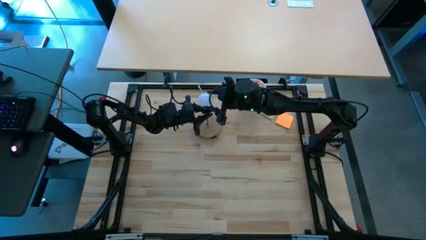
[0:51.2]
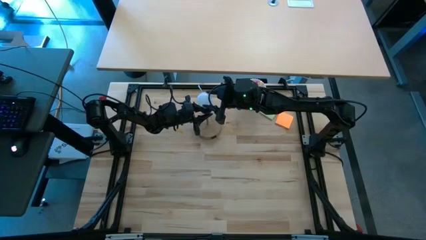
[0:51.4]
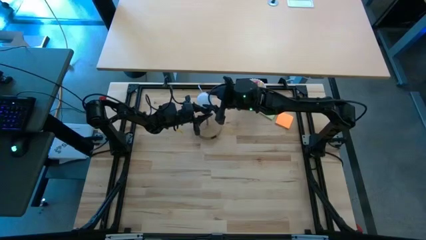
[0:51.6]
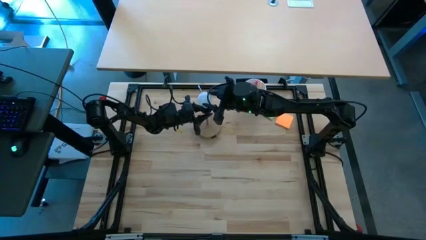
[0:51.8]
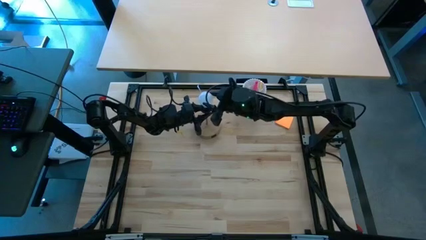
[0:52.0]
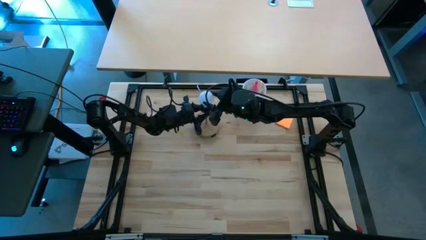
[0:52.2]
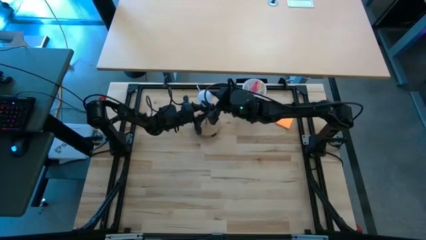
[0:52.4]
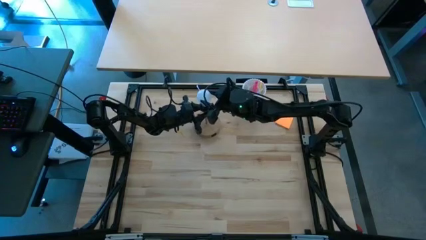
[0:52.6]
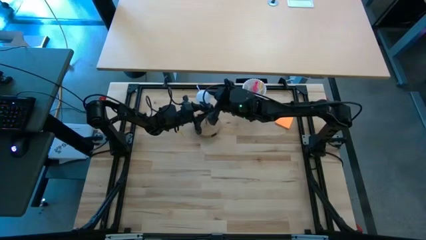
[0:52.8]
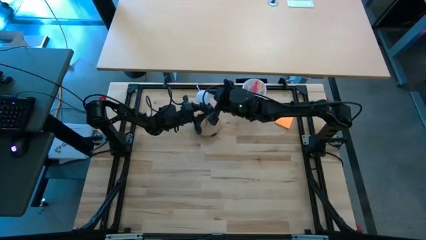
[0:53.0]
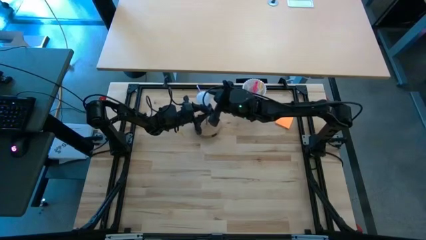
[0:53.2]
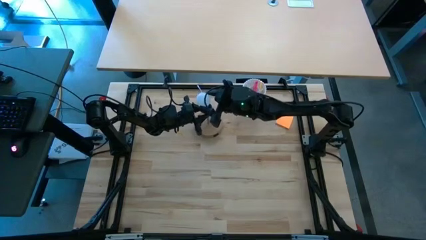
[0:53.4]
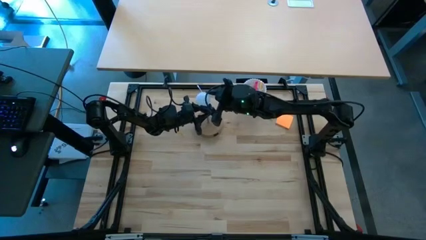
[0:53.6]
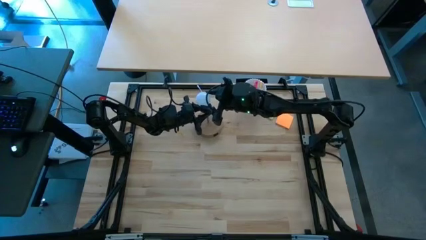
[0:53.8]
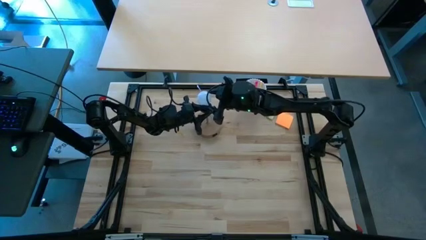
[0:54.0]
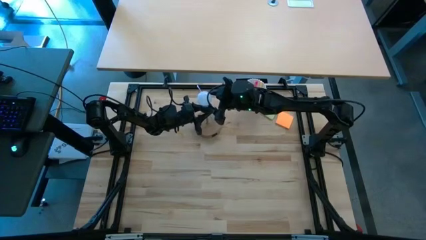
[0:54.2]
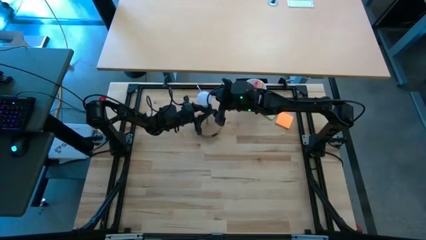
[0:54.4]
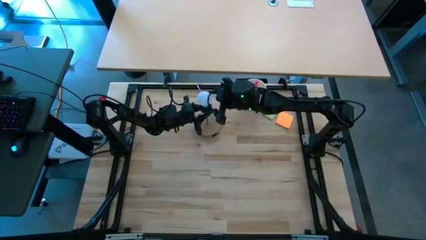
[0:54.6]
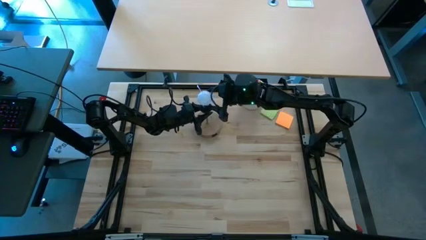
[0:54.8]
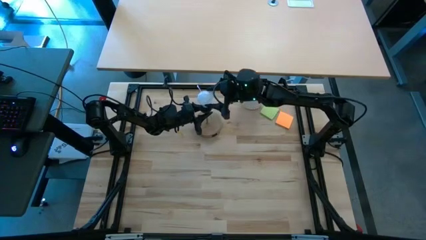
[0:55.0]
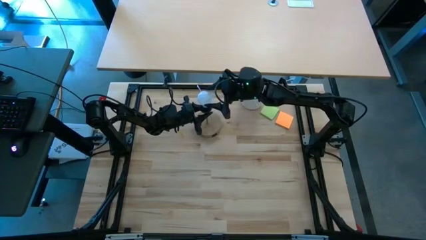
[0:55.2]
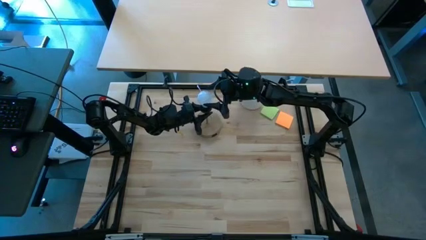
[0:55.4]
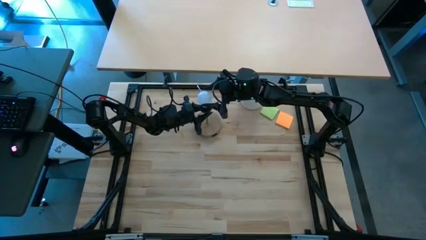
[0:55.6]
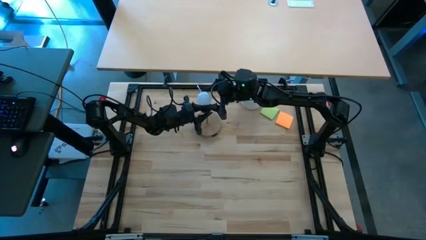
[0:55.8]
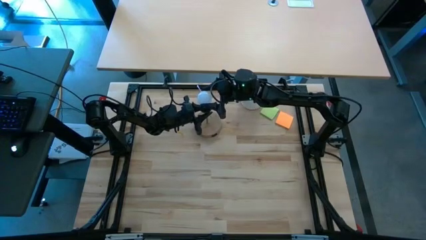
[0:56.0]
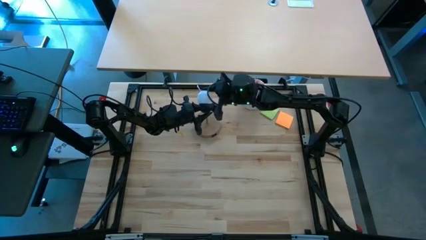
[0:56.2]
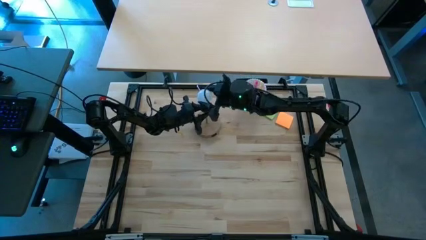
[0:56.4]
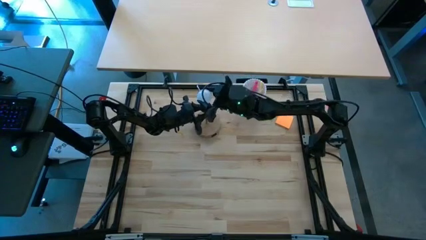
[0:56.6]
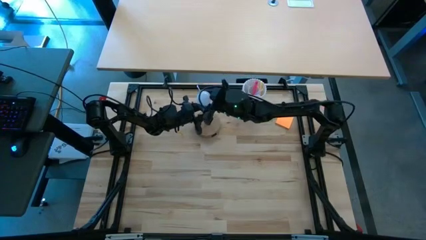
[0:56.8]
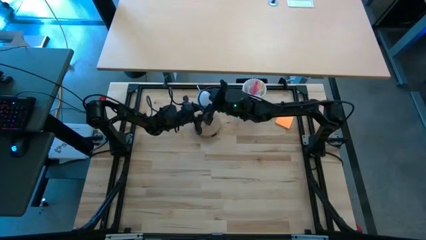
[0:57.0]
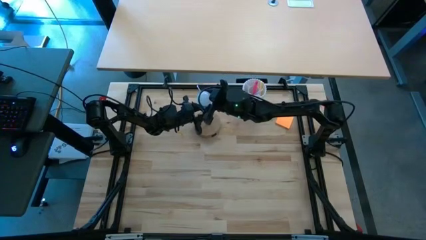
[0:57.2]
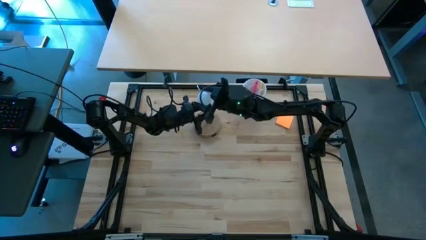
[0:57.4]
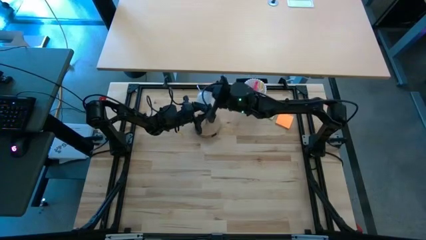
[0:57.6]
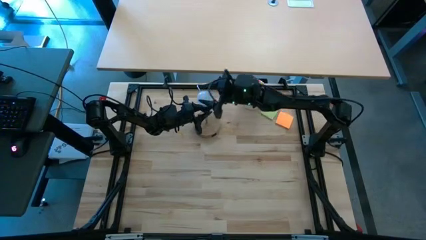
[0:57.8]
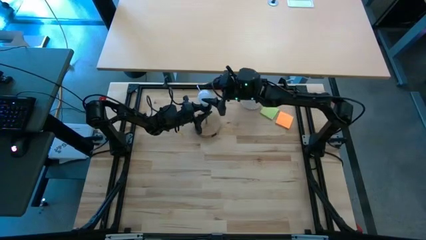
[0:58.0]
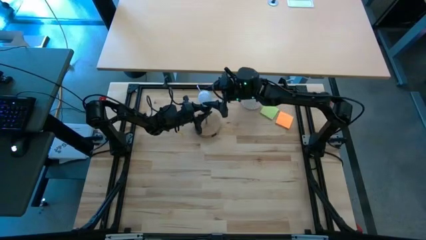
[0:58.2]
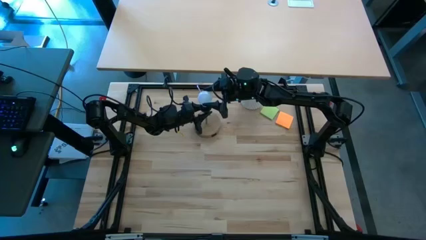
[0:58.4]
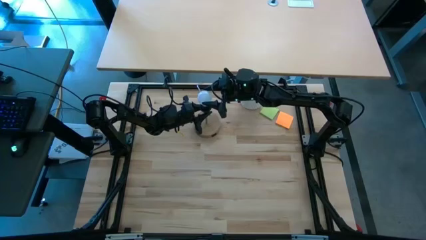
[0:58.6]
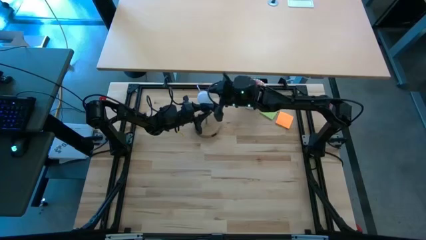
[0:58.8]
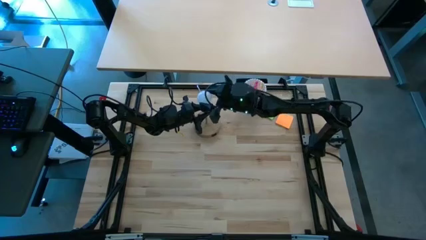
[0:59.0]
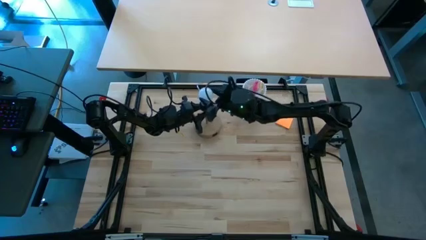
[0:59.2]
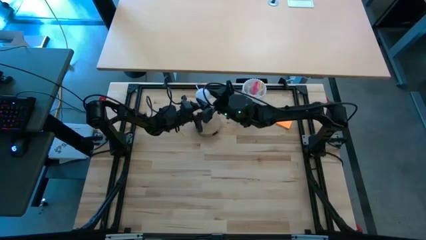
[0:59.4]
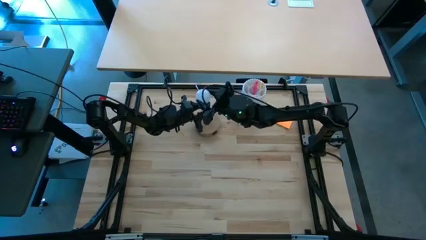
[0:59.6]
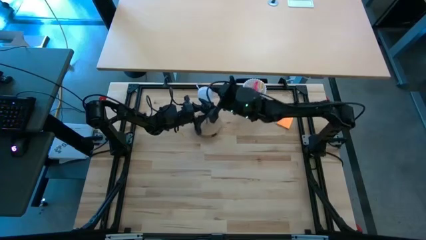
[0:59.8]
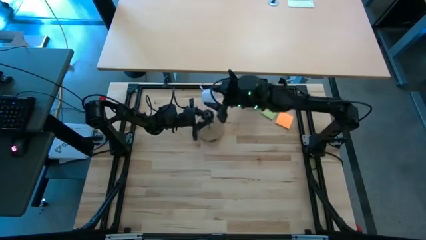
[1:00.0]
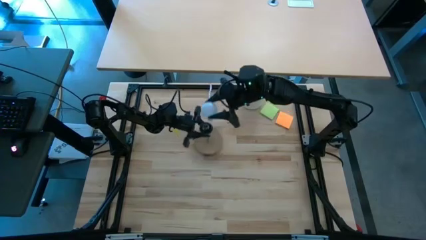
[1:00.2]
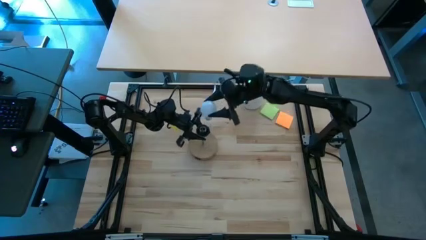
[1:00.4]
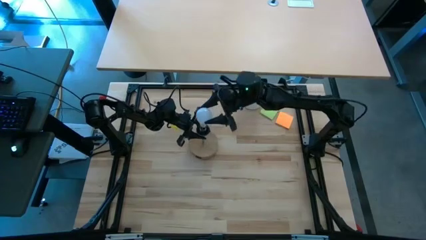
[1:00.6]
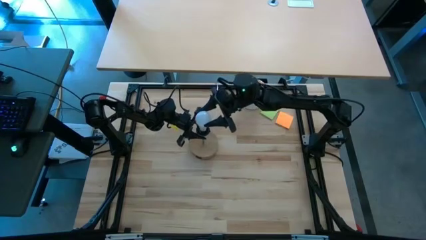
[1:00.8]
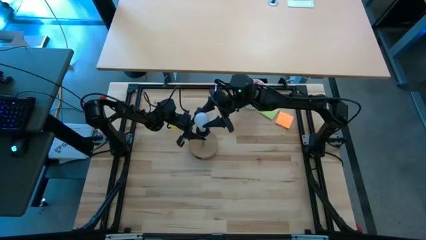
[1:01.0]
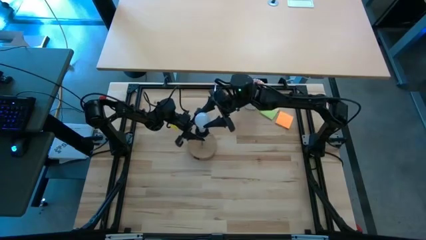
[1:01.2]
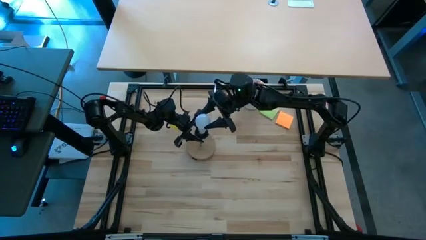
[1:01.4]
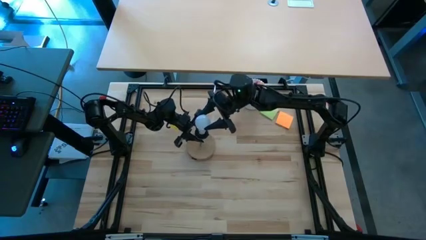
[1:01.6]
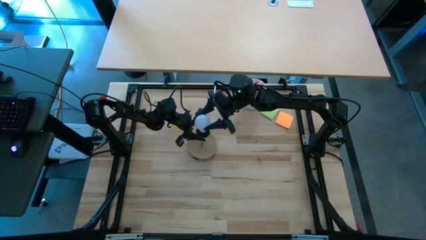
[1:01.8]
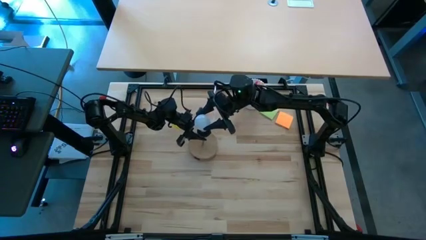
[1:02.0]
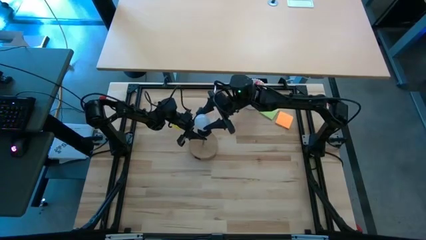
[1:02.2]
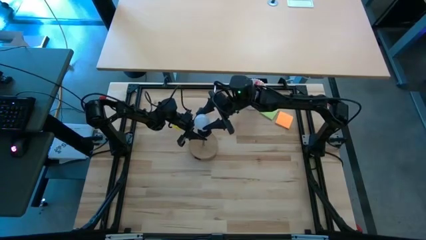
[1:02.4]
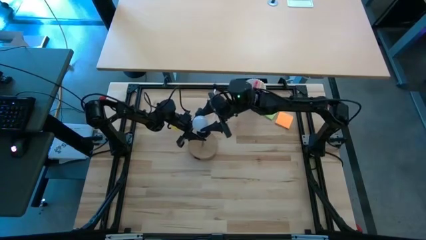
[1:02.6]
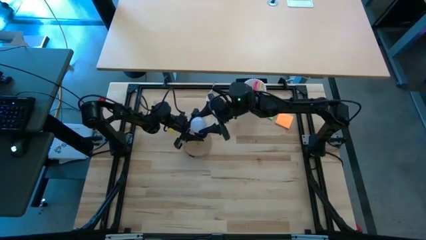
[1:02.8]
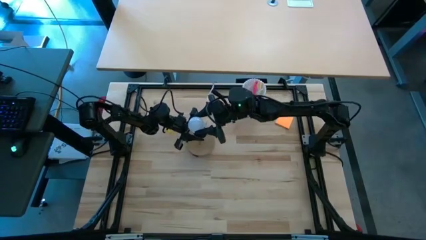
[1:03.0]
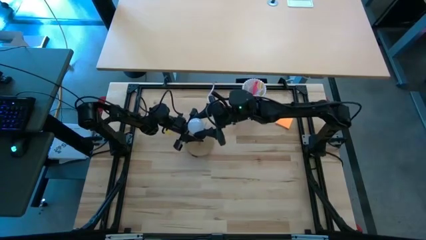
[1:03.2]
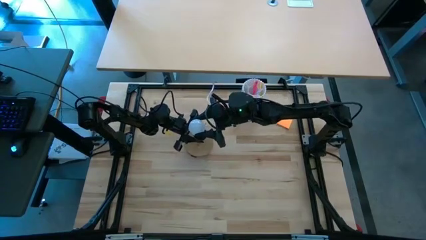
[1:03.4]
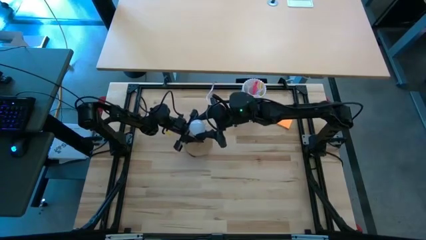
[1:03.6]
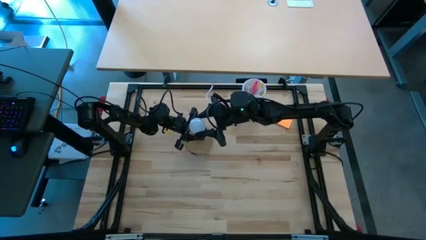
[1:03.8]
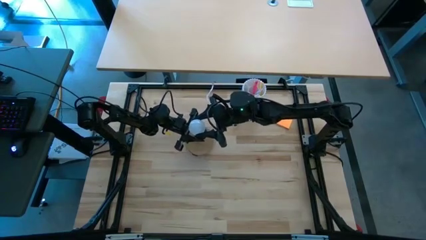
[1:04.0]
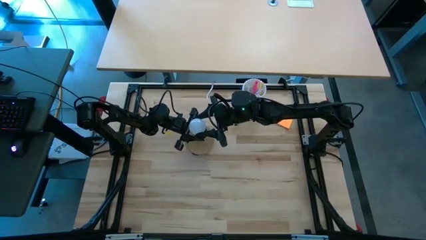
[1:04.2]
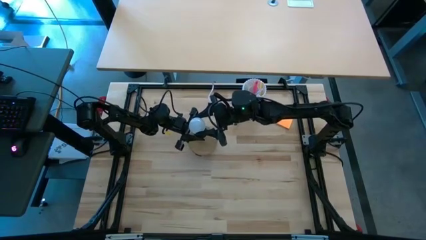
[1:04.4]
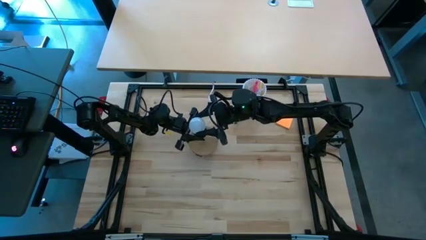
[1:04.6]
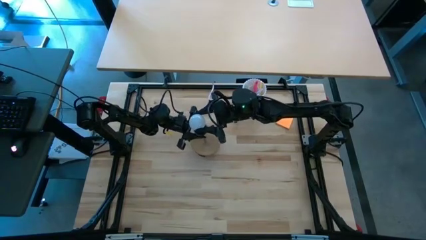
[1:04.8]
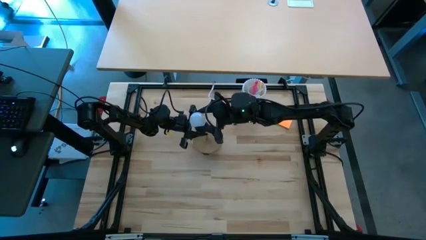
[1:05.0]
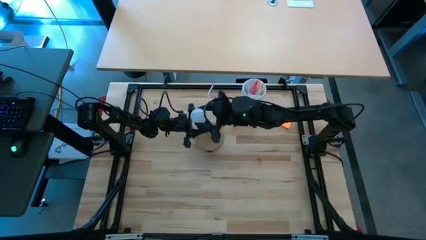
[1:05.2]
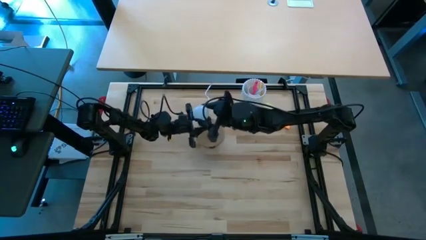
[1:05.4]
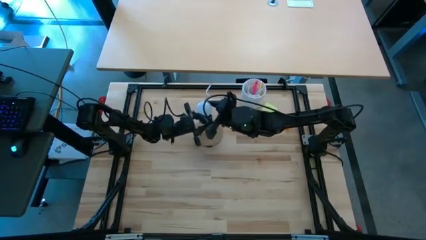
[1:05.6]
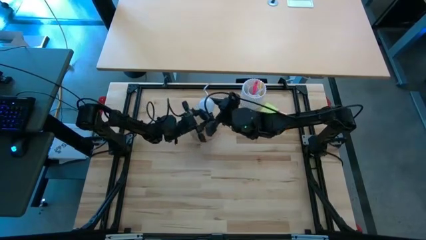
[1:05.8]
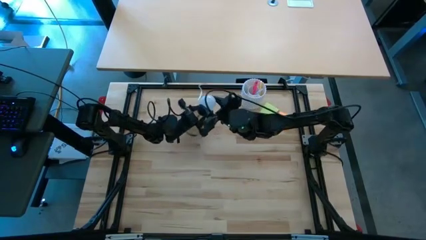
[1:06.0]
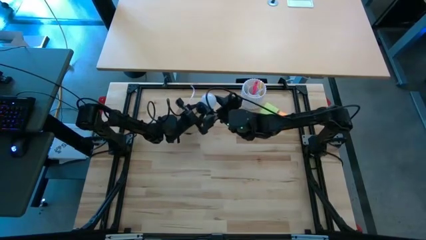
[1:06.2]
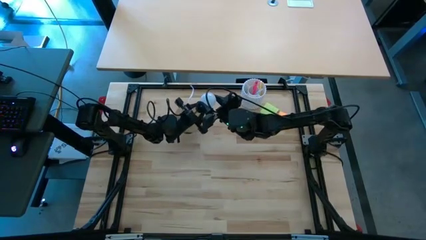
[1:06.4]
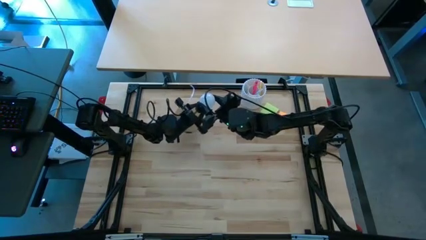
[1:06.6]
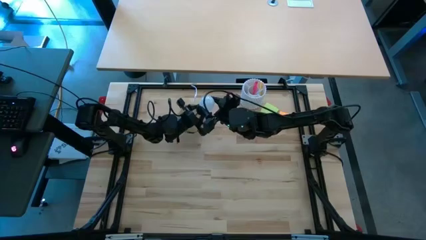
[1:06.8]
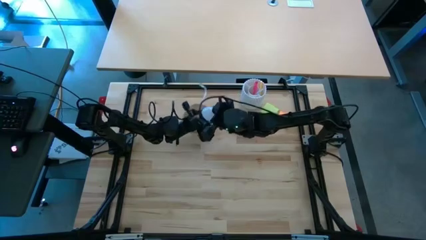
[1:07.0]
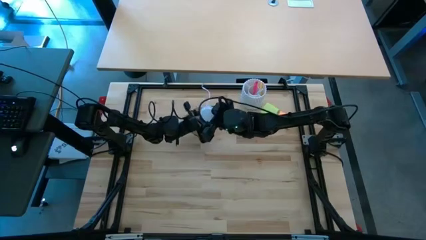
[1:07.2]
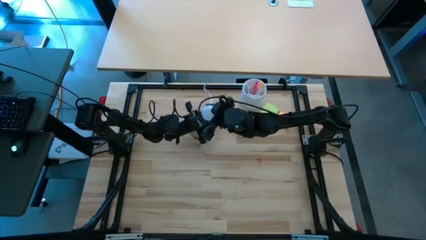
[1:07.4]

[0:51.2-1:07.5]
Task: Screw lightbulb
Insert the light bulb into the lamp
